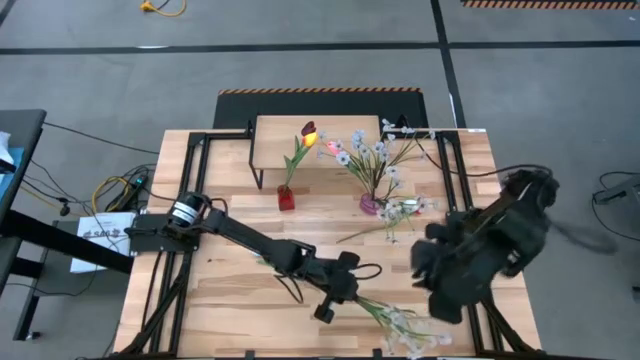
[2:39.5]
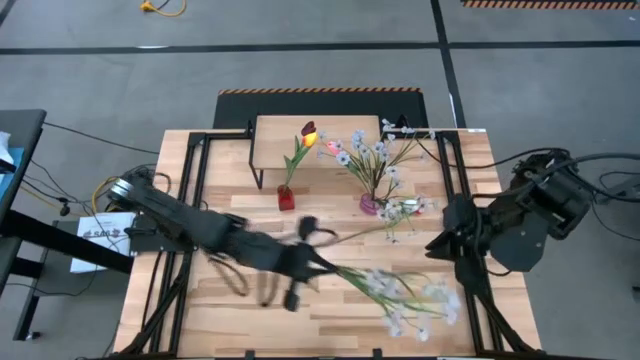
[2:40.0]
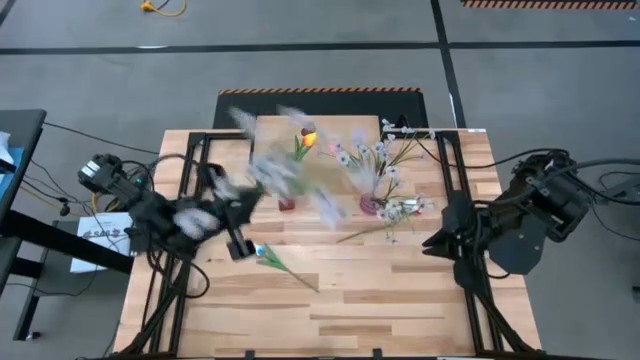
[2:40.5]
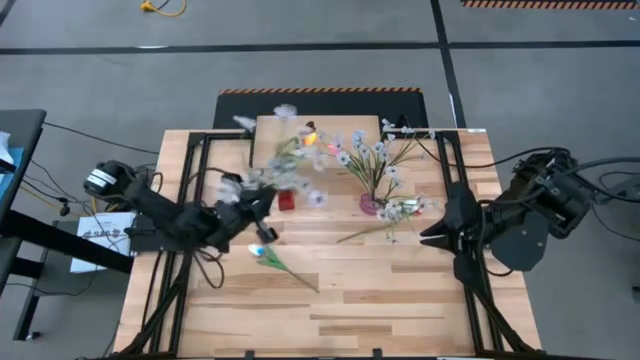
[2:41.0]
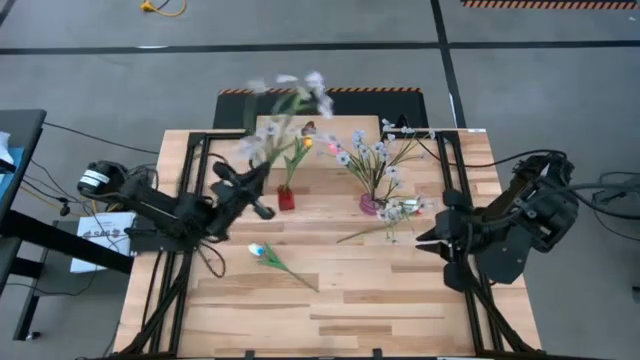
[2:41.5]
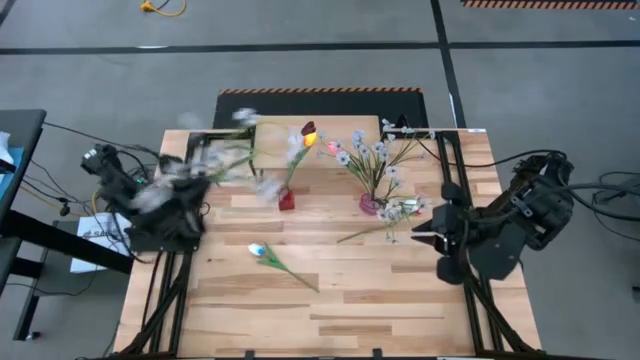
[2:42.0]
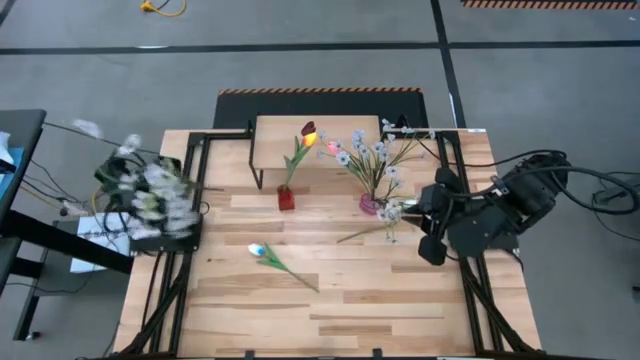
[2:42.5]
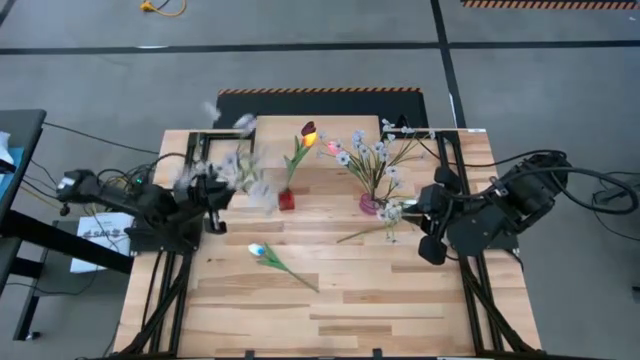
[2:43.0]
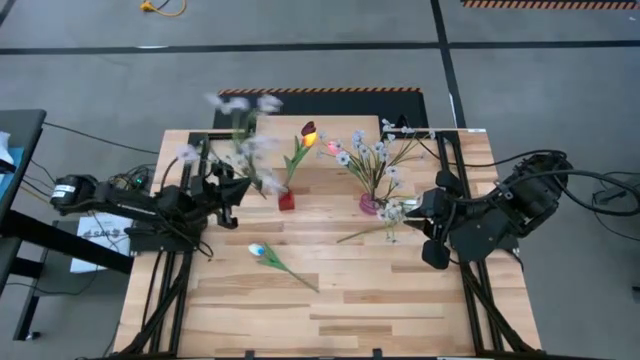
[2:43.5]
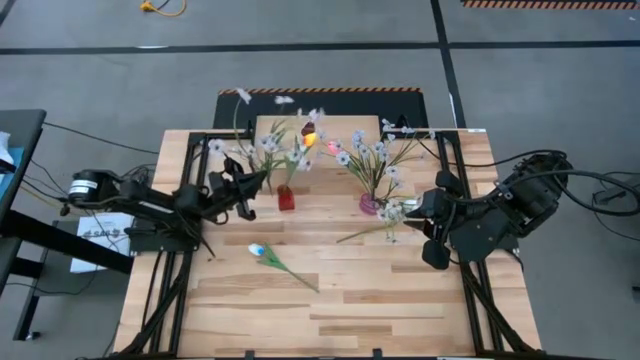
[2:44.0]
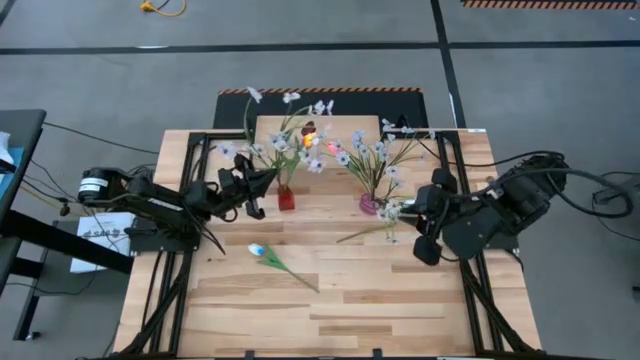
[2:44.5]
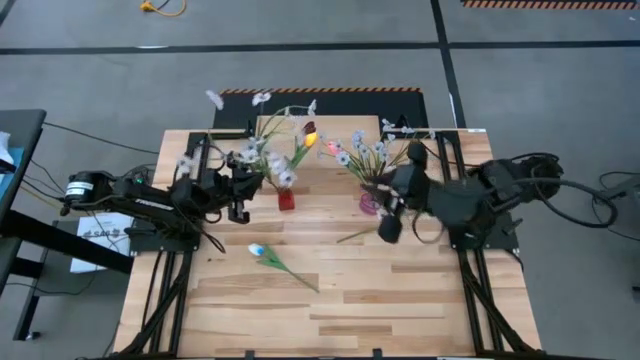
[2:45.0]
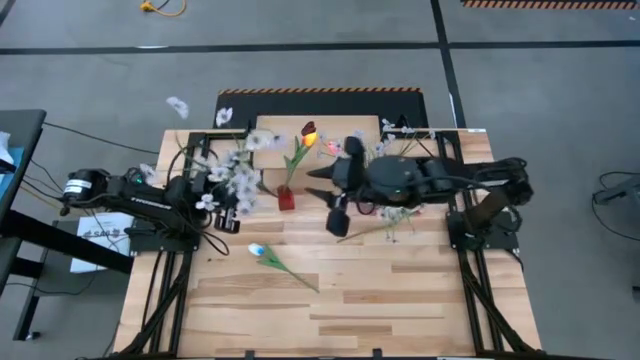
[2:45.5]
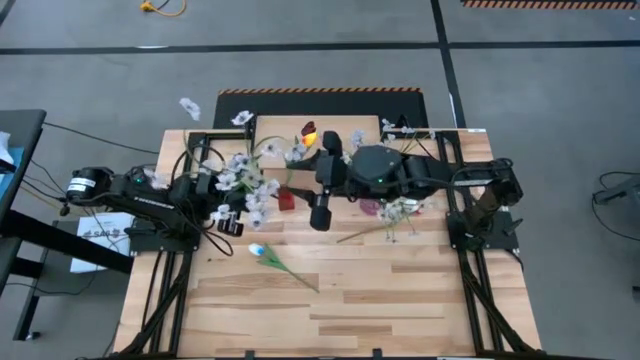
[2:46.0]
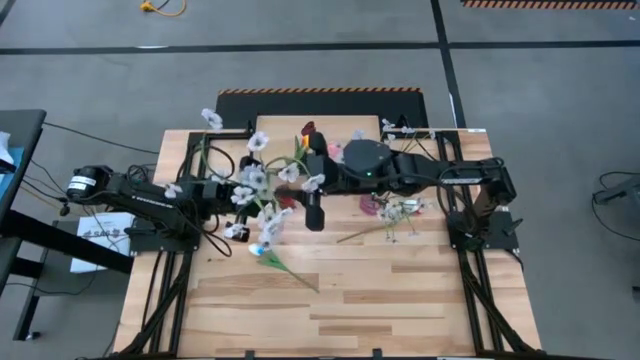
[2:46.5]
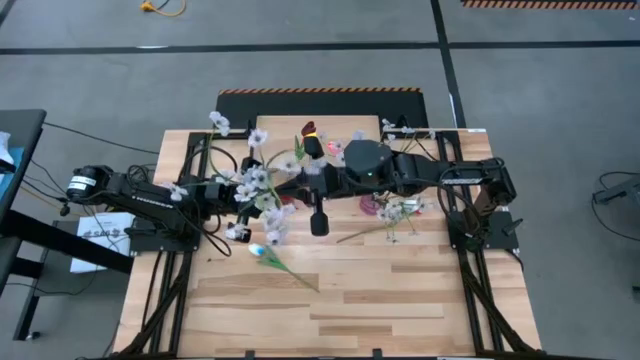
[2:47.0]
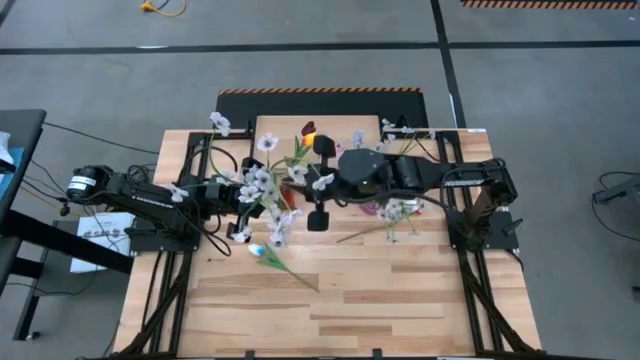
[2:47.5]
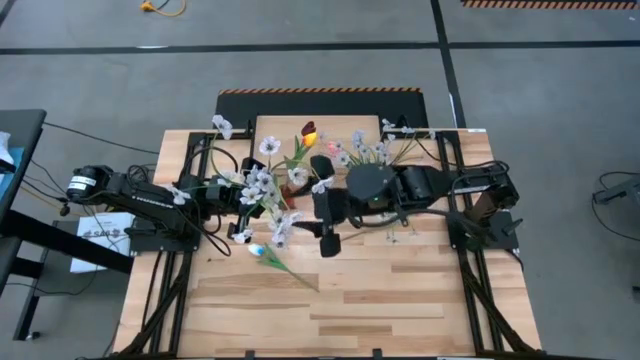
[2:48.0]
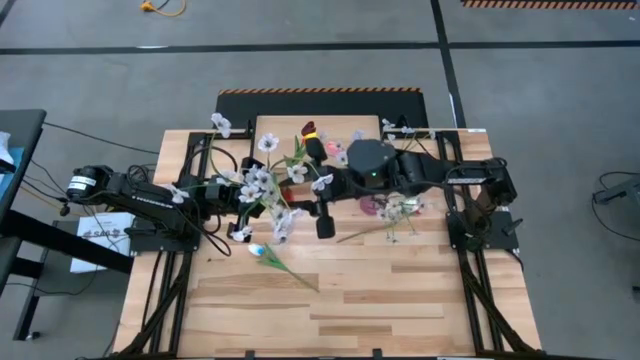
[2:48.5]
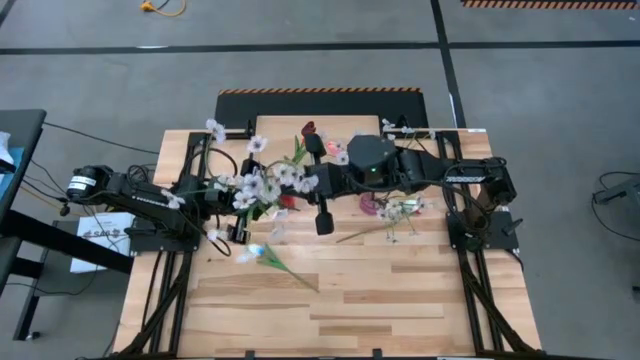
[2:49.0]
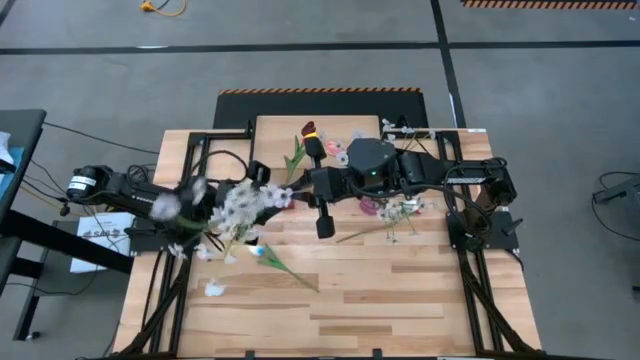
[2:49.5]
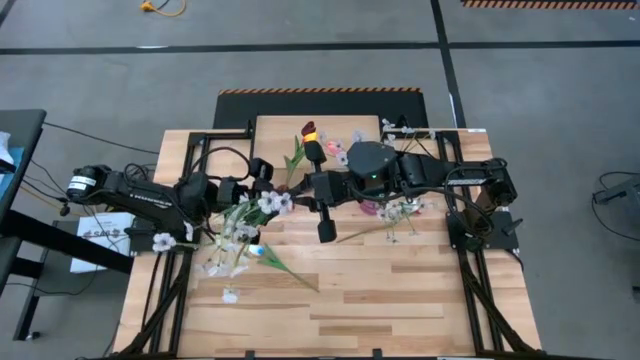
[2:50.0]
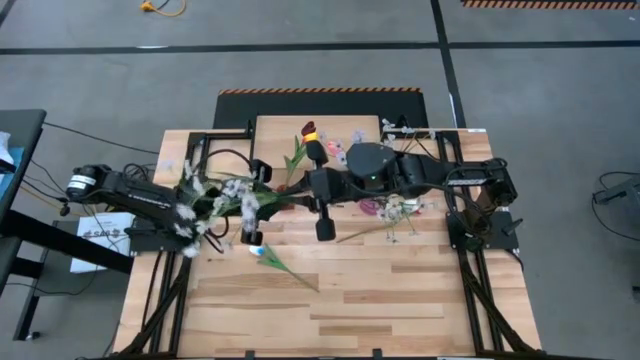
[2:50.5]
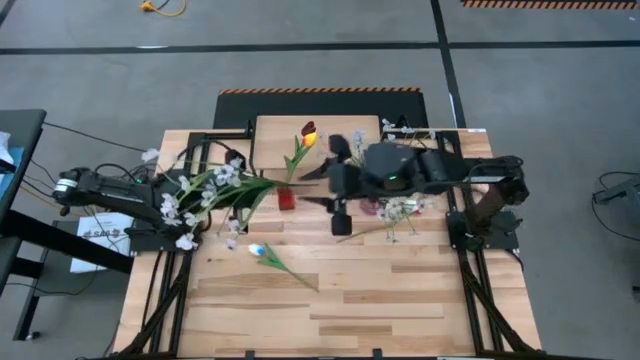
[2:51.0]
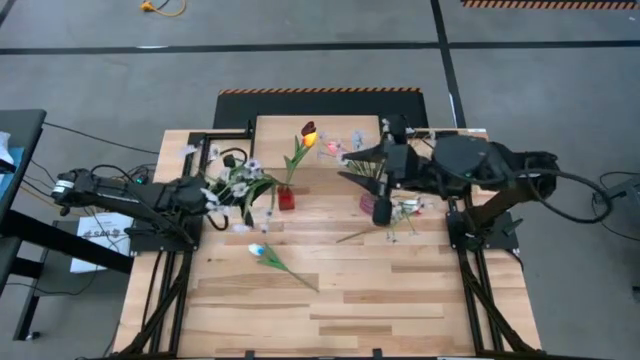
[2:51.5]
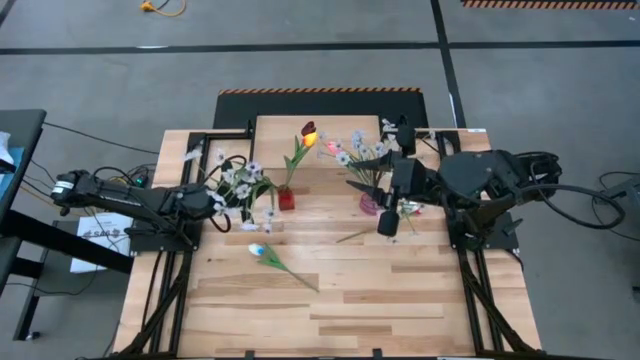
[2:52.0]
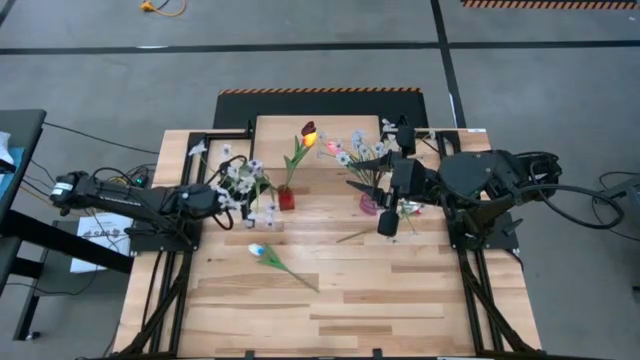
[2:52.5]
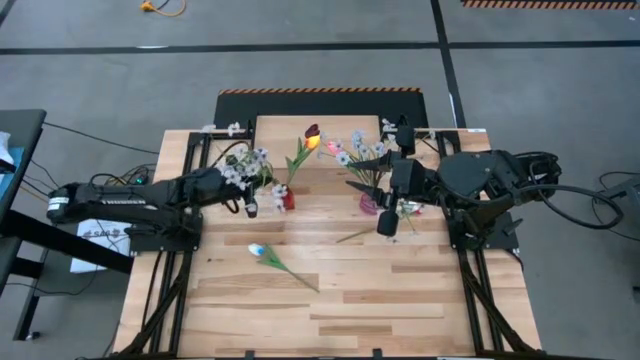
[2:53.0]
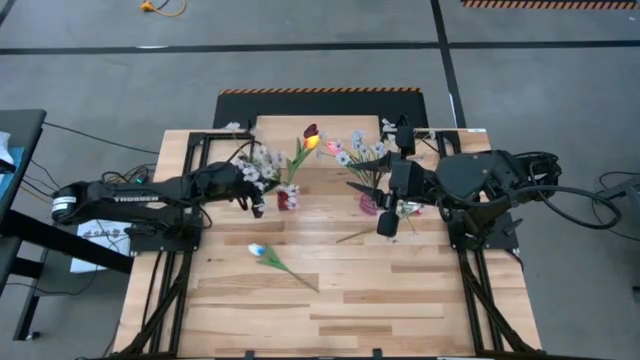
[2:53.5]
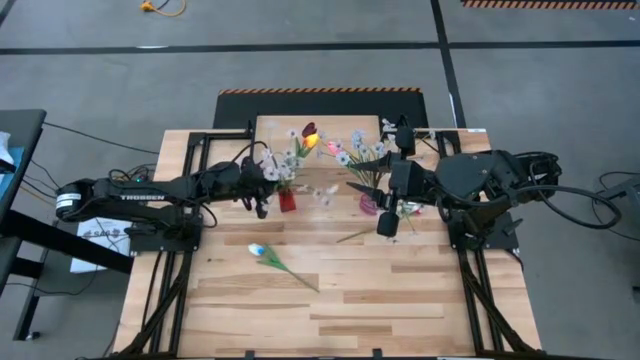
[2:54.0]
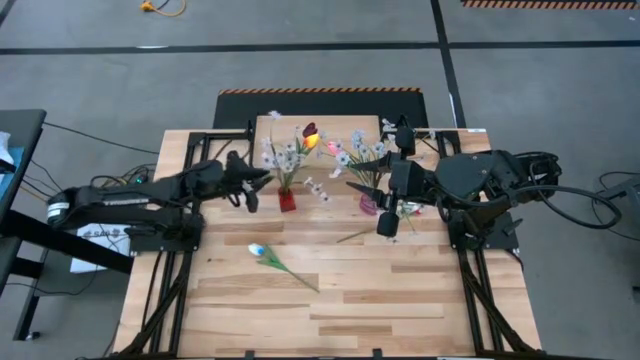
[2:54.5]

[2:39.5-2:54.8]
Task: Pick and place flowers into a vace then onto a shelf
Put the white flowers into the red vase

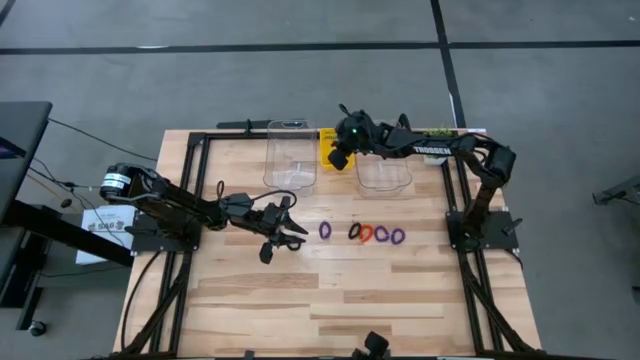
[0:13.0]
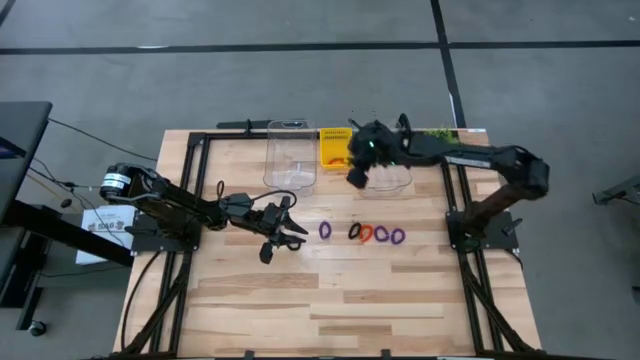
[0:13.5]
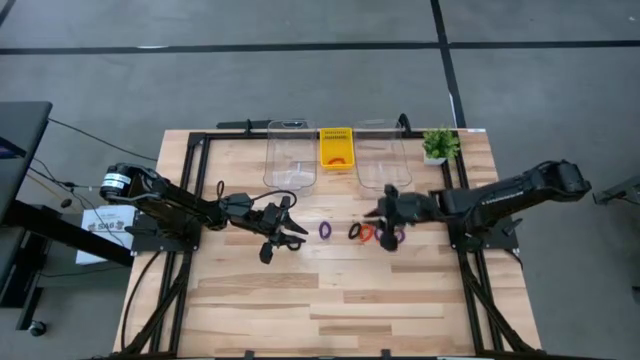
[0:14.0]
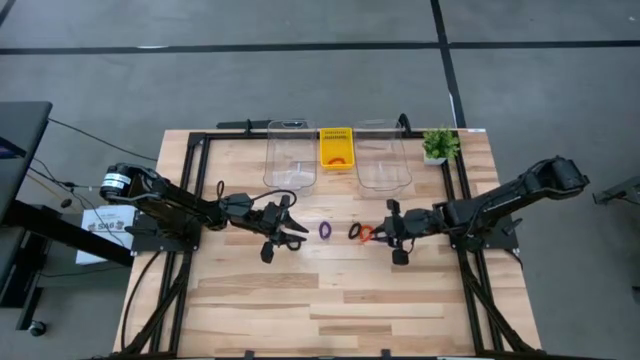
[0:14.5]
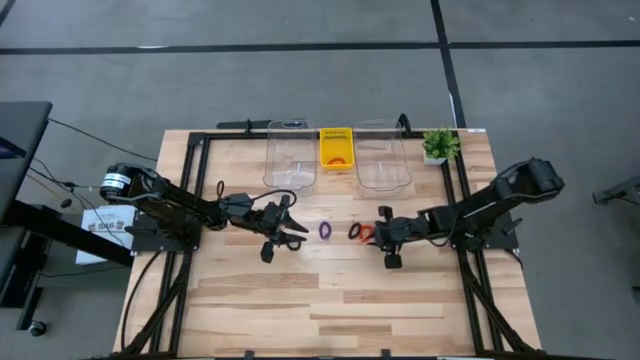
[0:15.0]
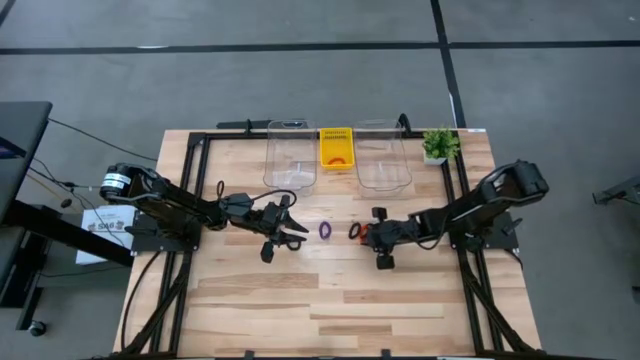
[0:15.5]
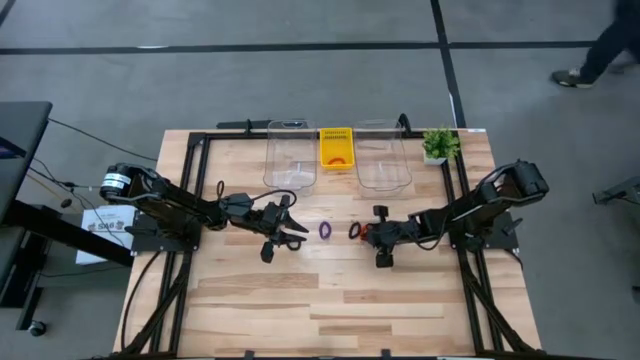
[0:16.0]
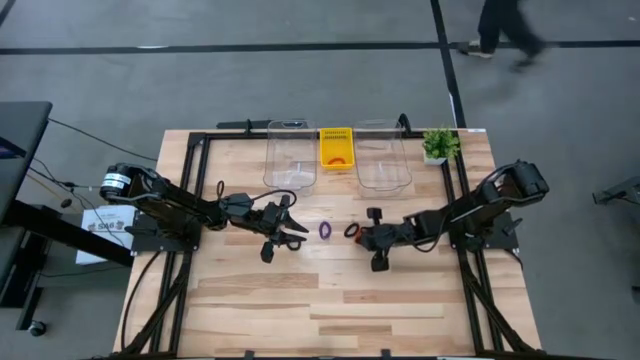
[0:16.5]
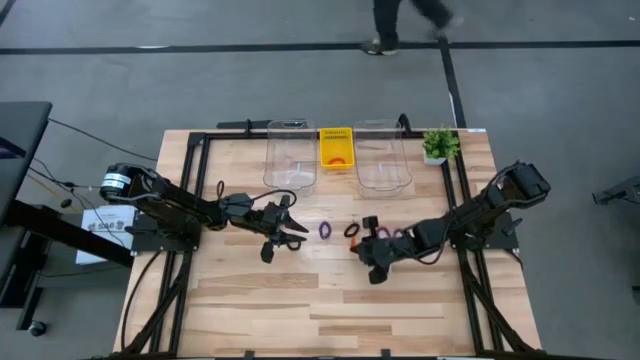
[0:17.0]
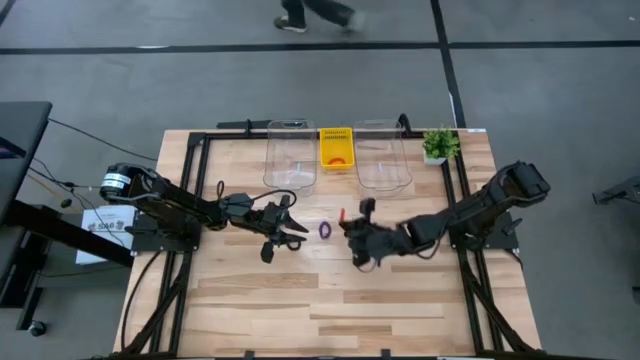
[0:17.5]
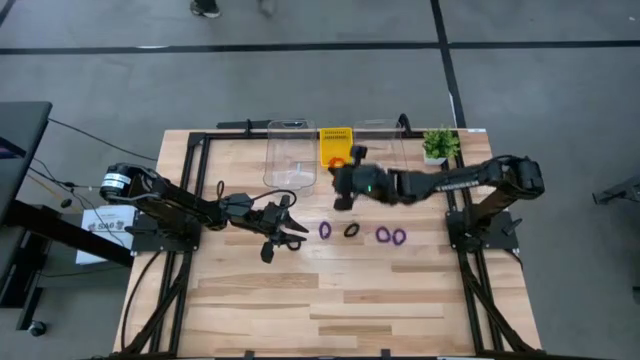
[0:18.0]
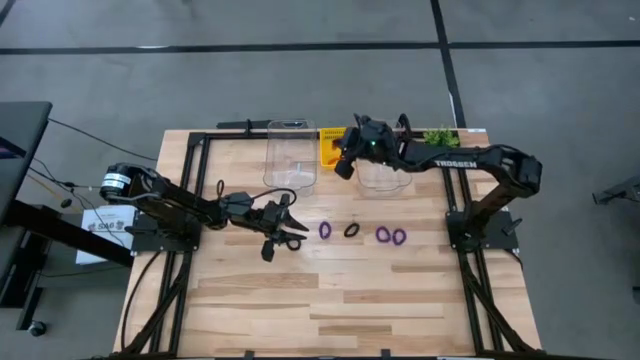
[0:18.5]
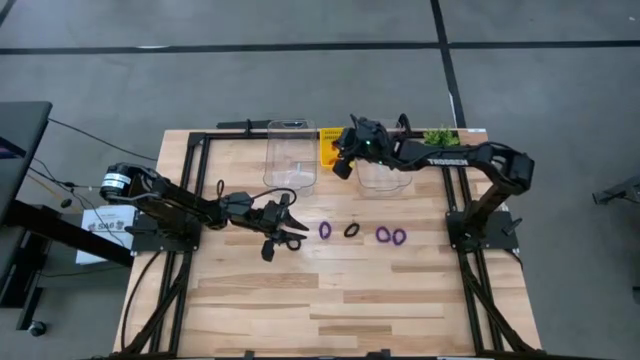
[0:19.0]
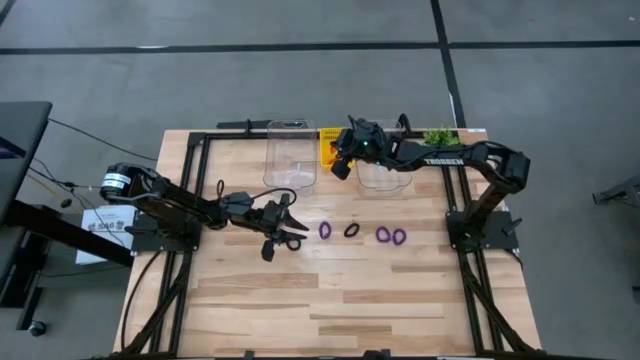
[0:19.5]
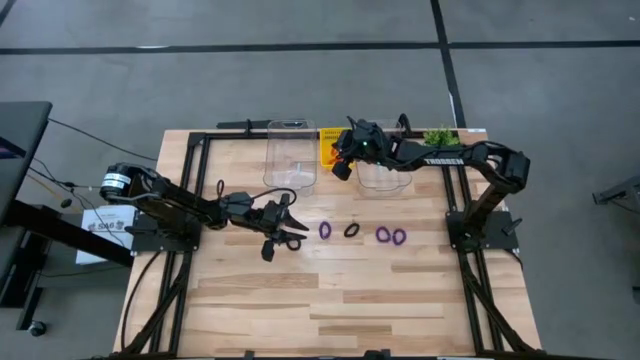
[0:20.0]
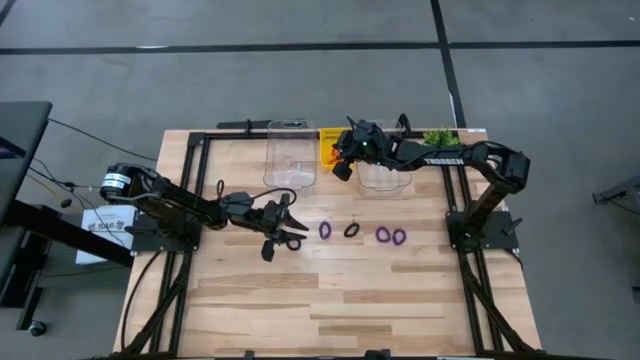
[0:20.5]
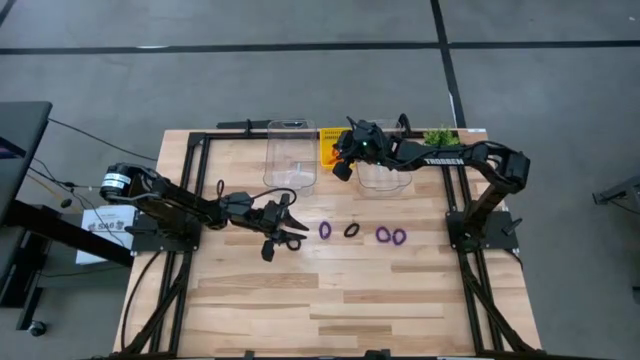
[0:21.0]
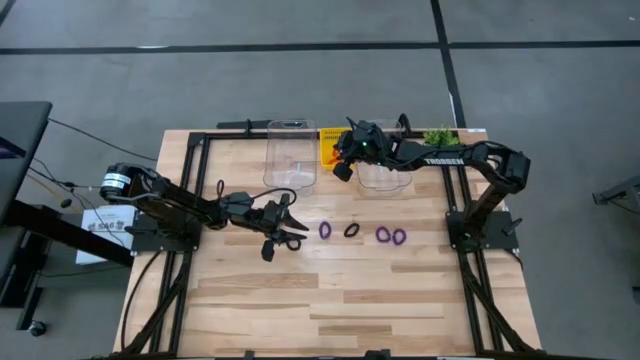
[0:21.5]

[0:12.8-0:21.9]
Task: Sort spring keychains
Put the right orange spring keychain into the yellow bin
